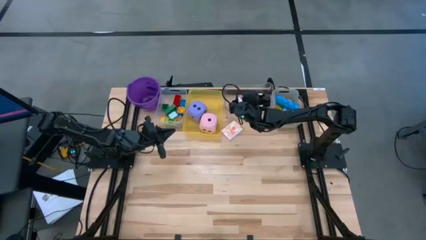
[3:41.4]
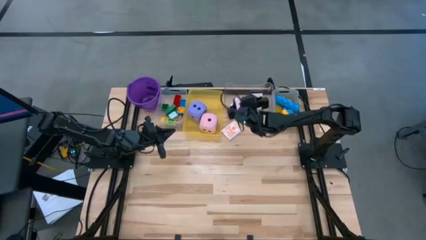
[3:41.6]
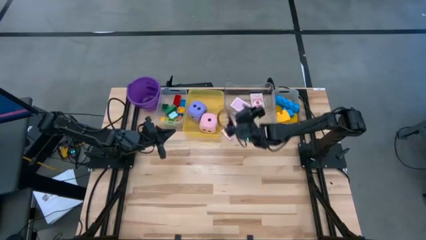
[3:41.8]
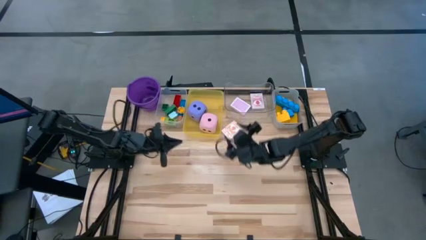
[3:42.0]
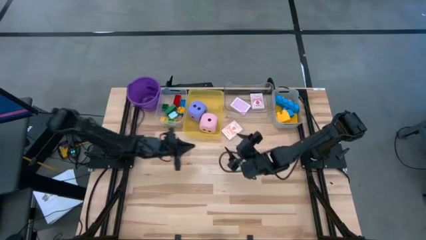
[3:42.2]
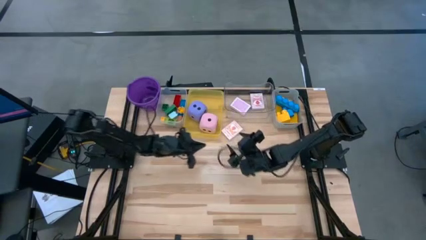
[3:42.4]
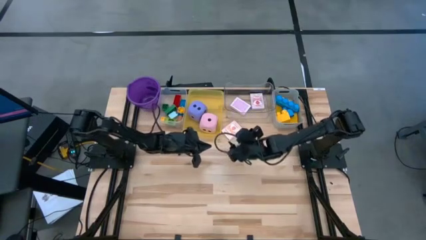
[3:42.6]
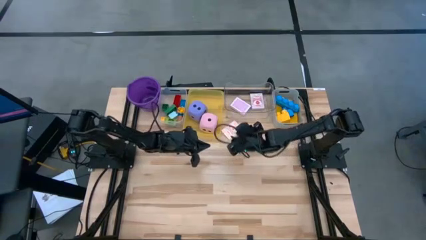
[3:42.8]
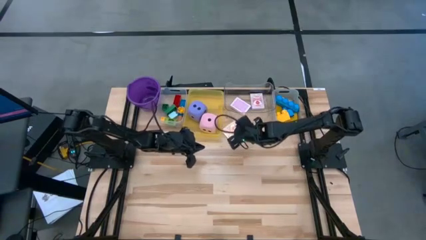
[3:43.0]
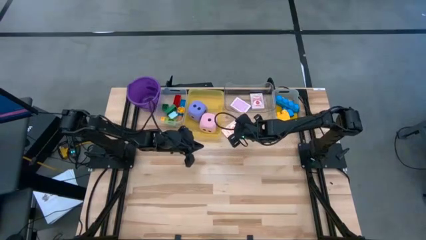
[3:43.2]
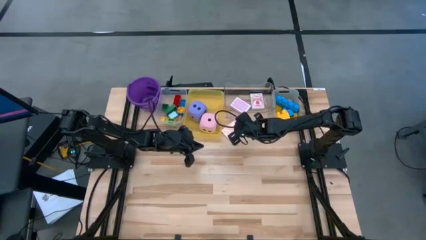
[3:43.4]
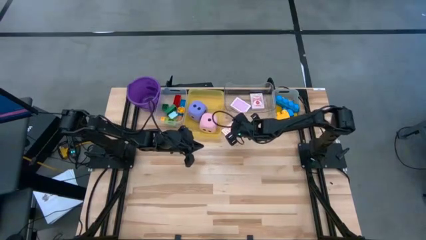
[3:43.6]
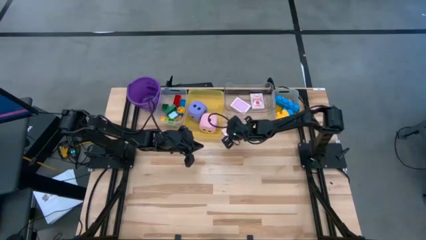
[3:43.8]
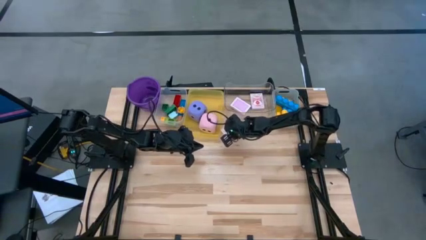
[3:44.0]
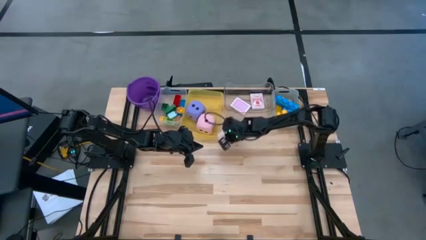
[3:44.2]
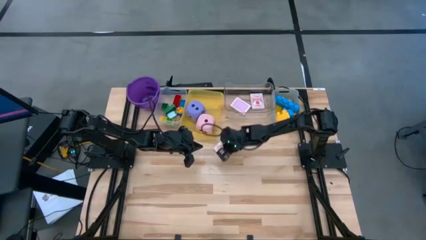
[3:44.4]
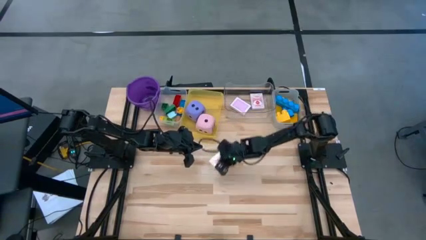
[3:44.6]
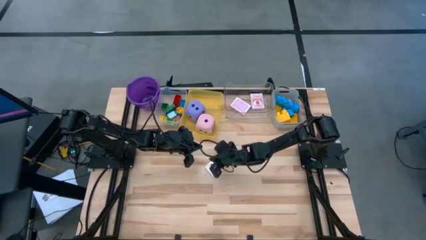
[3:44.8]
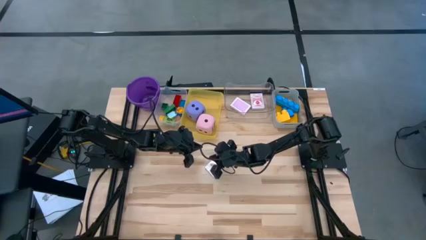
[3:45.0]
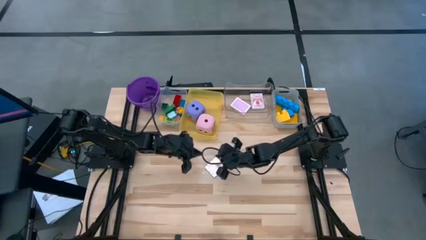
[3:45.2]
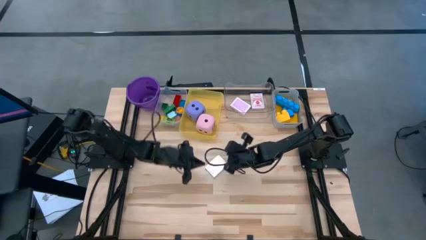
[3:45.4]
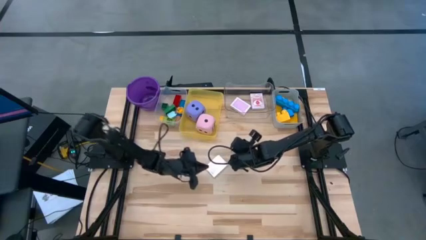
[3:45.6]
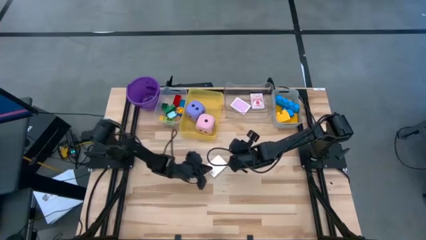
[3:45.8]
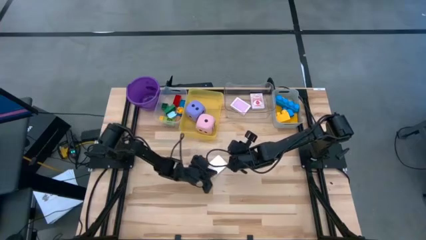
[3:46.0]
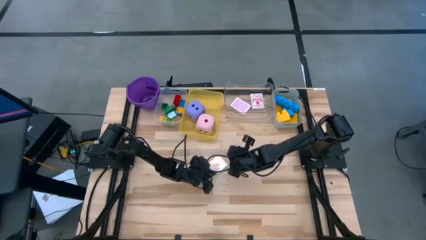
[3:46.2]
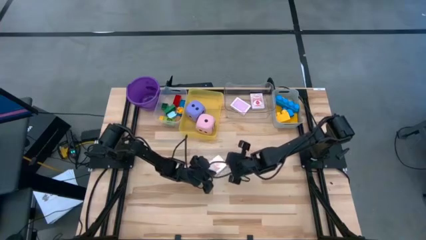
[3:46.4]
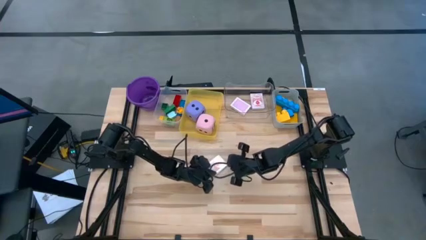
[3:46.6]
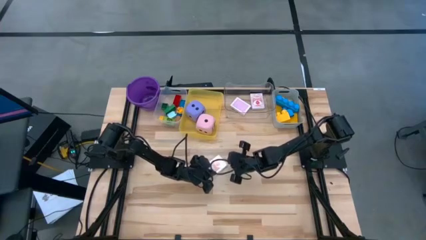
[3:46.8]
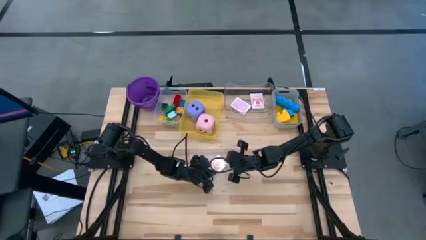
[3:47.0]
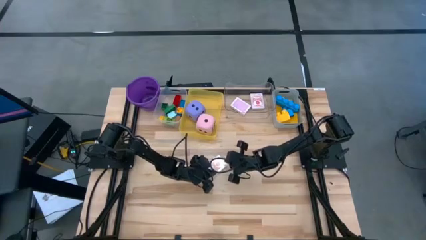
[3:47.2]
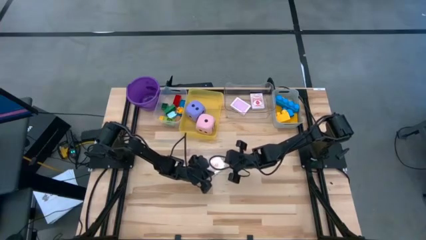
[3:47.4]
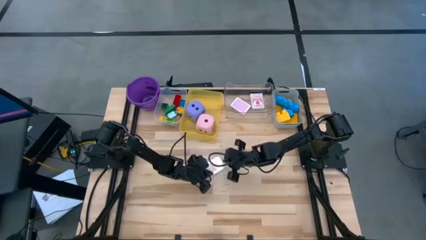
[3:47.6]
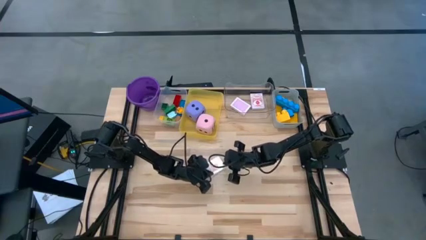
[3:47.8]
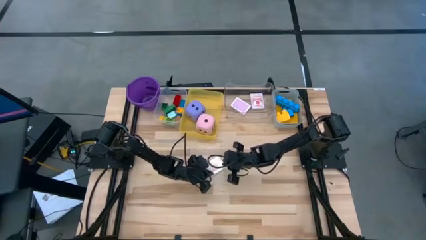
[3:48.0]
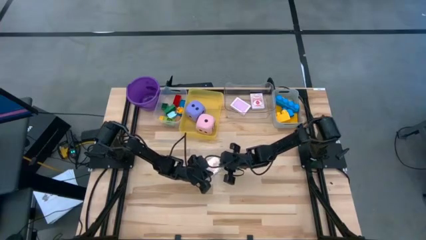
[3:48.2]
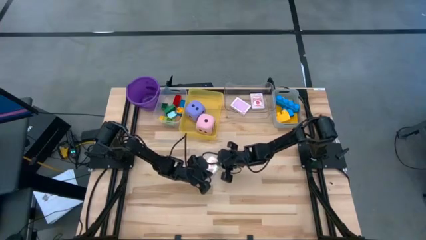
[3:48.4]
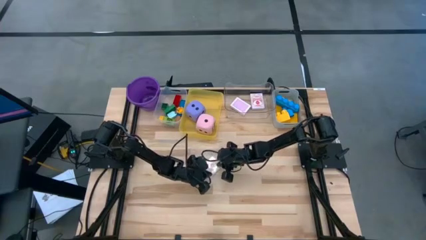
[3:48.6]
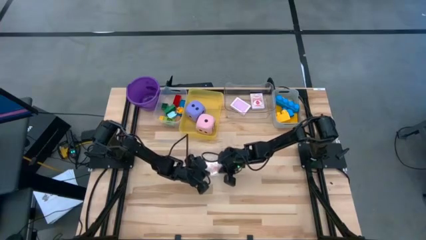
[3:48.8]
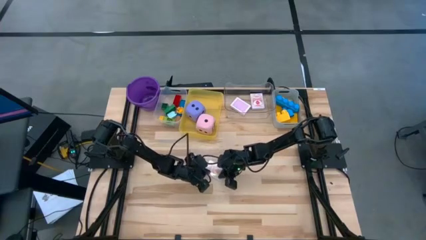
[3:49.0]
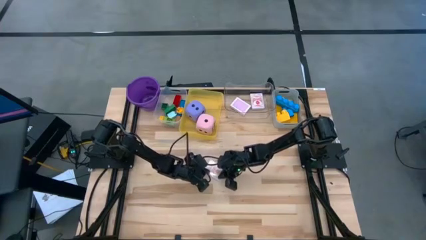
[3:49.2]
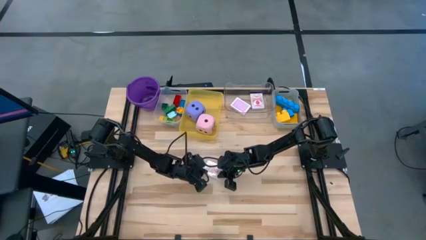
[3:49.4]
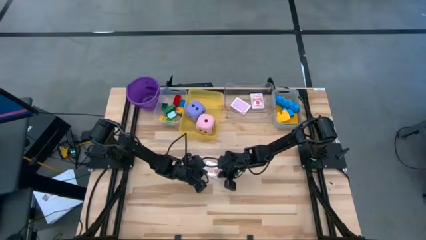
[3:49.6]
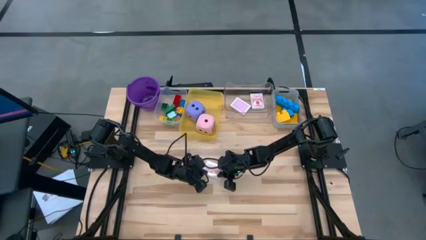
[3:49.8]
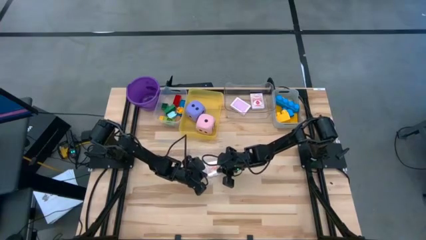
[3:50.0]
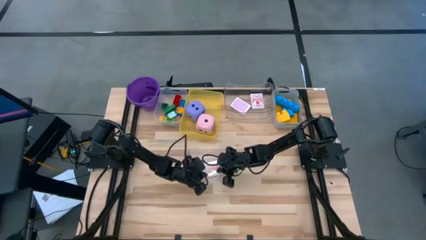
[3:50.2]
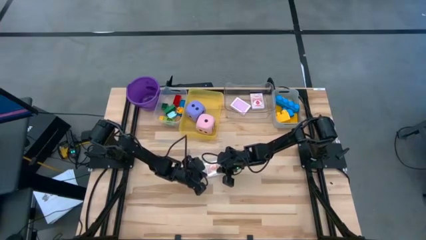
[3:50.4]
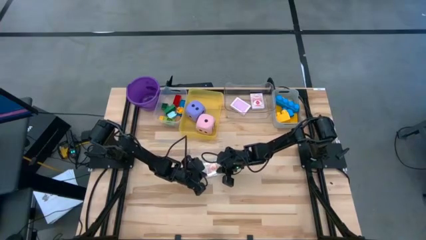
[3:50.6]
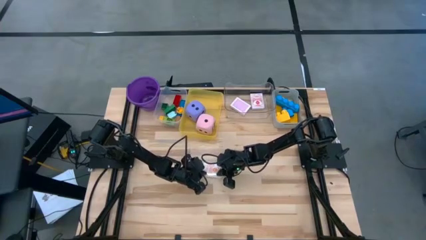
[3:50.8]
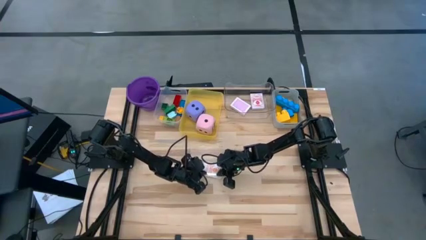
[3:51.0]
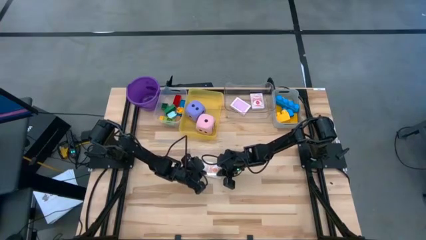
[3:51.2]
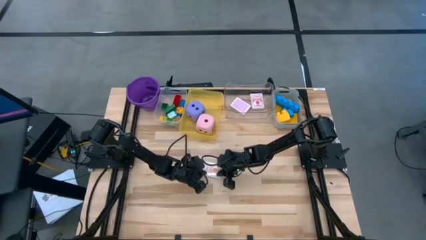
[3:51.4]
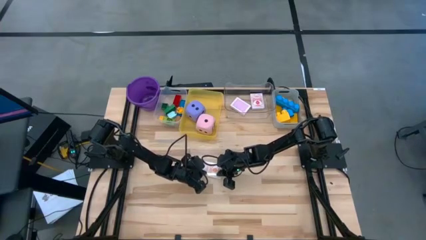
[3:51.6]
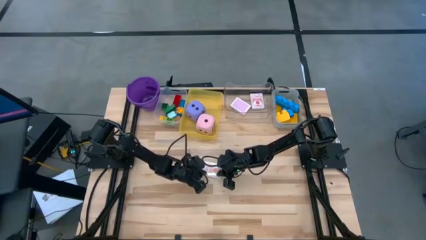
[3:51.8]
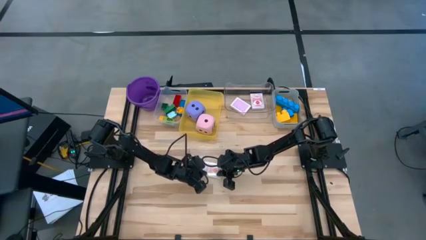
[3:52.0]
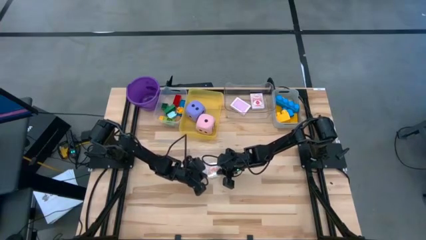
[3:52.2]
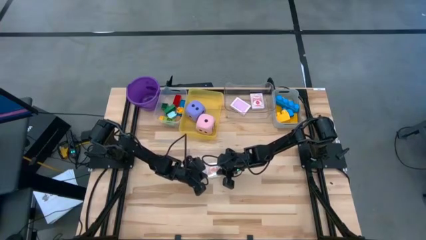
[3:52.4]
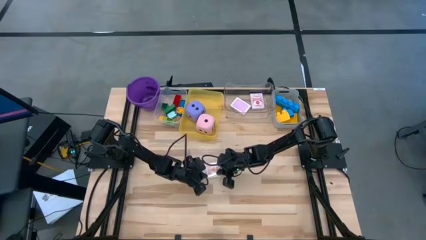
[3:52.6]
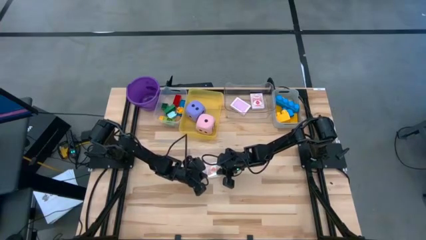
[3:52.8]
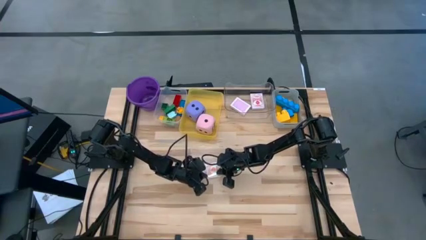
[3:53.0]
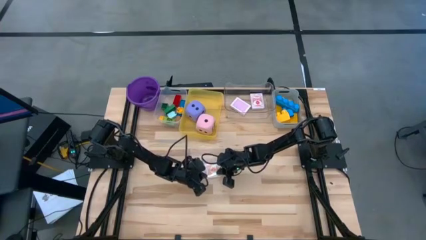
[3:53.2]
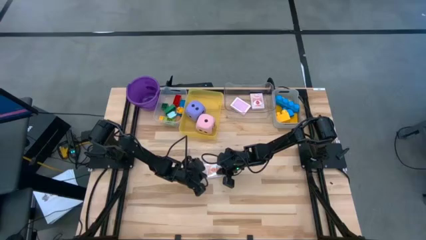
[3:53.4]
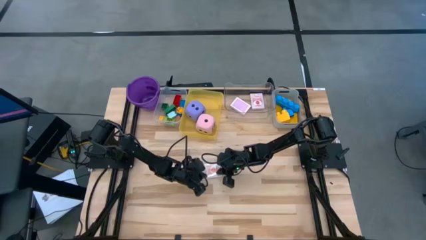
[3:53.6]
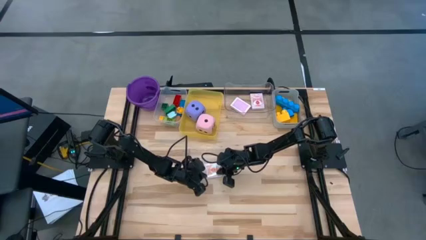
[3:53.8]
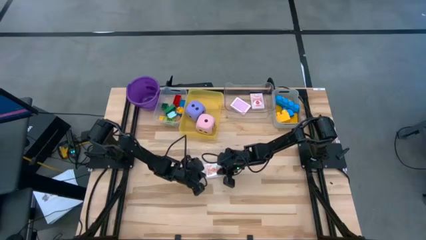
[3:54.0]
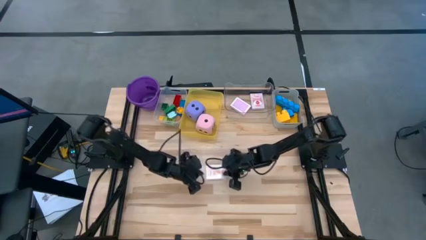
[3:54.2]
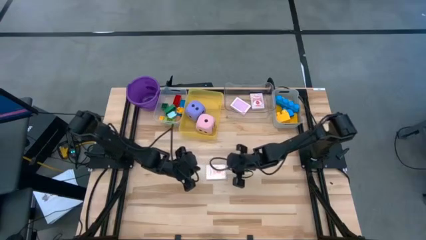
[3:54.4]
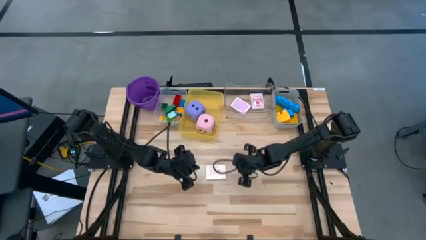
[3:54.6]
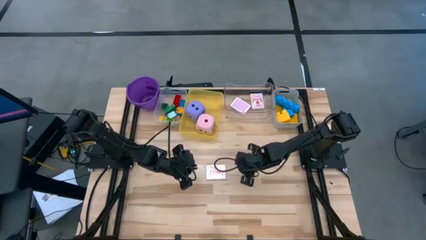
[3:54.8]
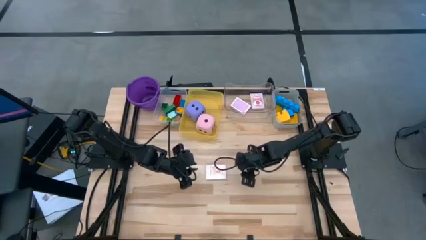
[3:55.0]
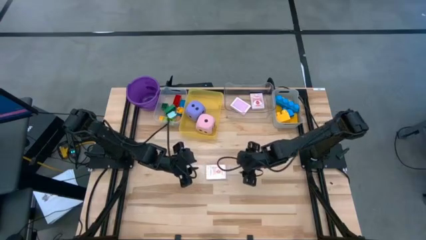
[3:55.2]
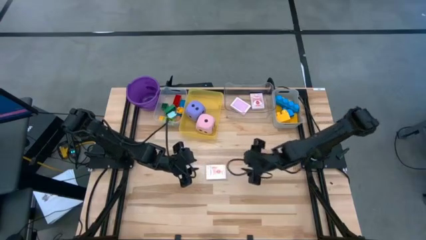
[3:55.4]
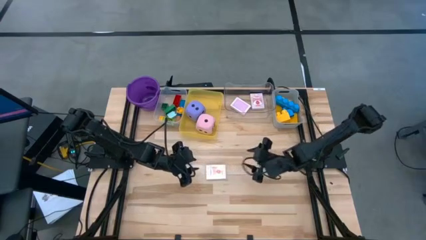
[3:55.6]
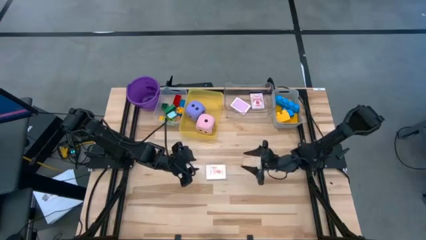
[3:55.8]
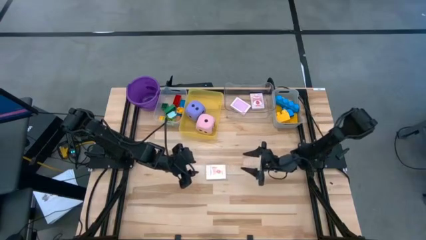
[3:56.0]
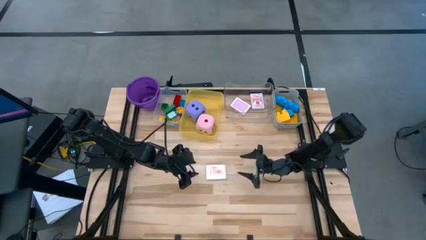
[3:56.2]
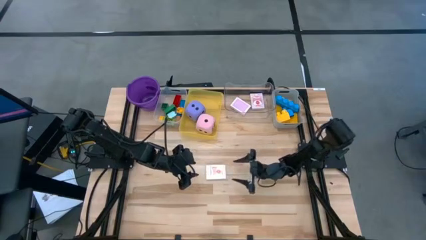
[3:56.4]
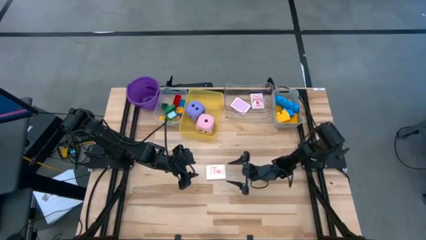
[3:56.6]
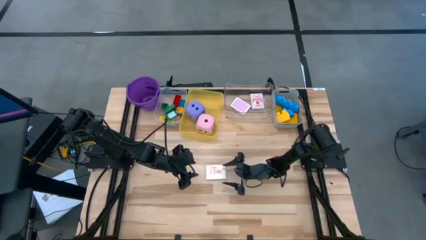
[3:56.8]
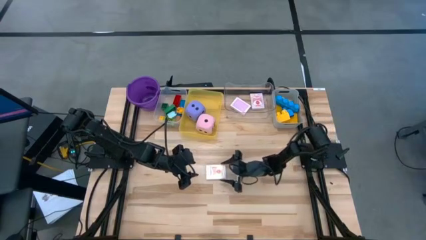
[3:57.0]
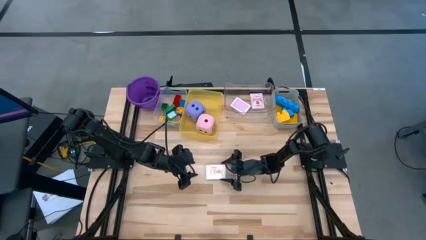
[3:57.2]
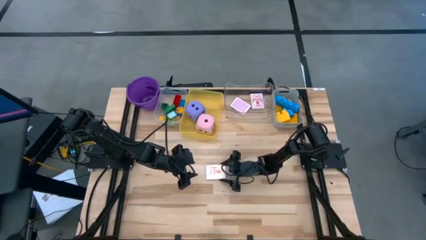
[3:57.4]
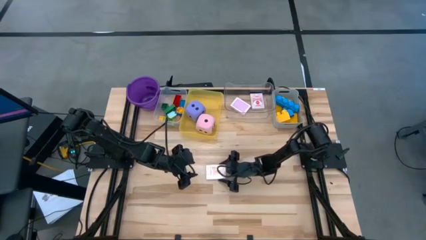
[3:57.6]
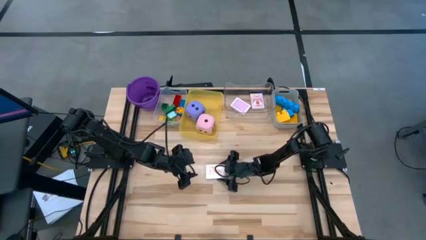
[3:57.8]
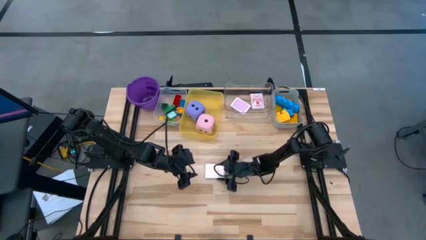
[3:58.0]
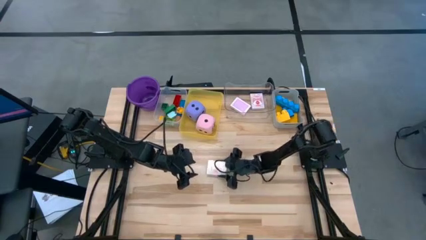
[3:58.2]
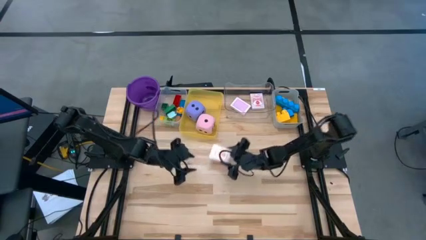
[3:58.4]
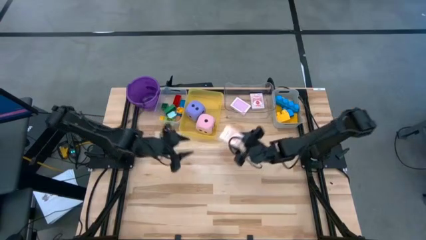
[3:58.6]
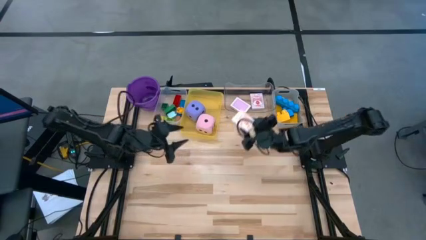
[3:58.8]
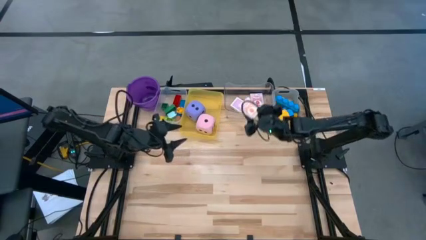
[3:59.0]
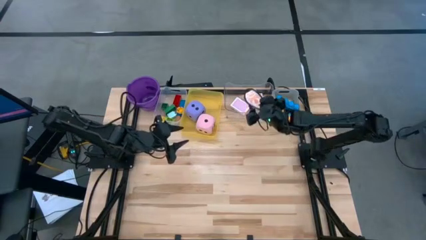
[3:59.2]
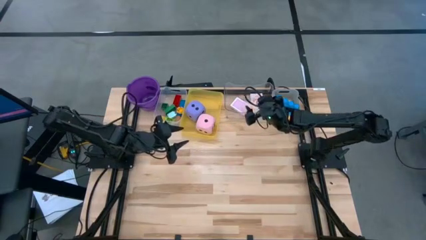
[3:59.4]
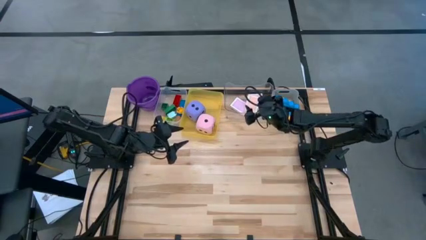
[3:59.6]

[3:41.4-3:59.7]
Task: Pick & Place Toys
Put the orange playing card into the transparent bin
